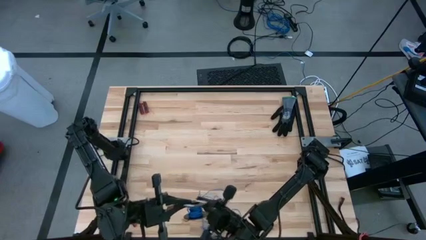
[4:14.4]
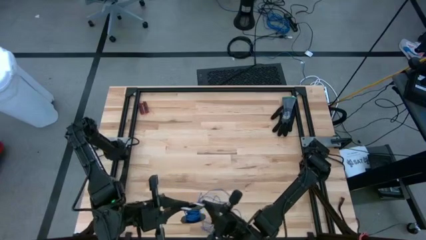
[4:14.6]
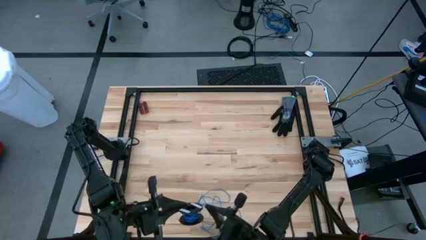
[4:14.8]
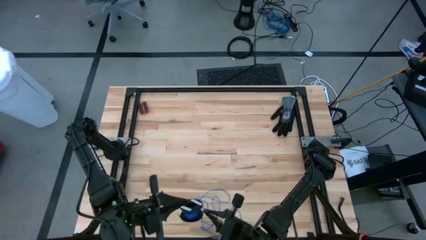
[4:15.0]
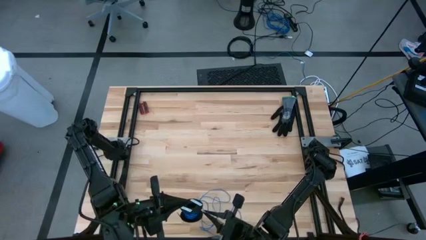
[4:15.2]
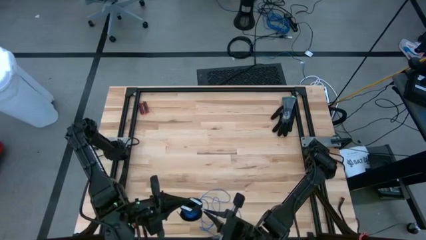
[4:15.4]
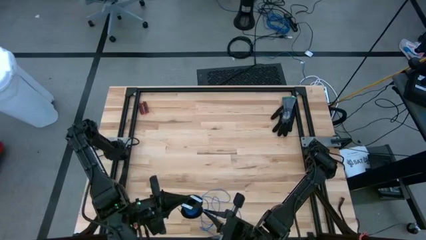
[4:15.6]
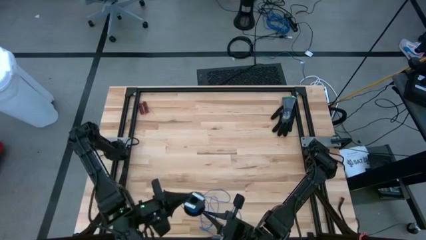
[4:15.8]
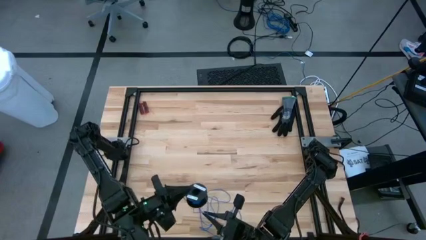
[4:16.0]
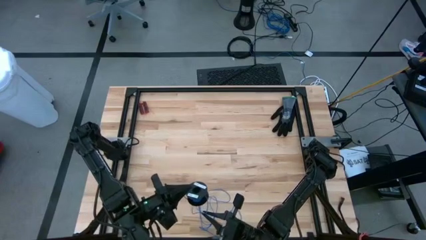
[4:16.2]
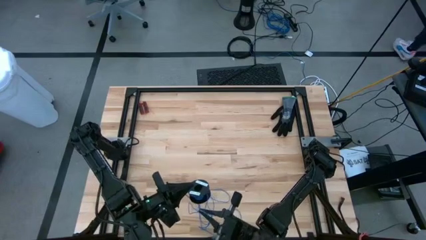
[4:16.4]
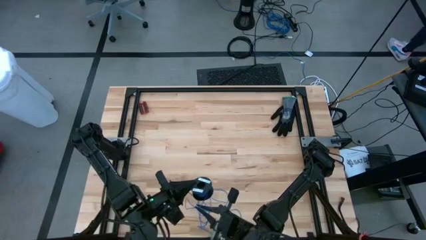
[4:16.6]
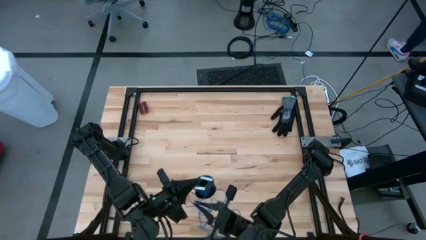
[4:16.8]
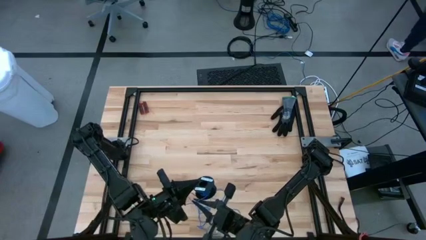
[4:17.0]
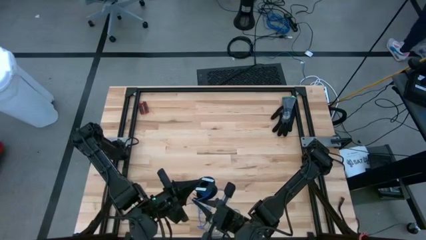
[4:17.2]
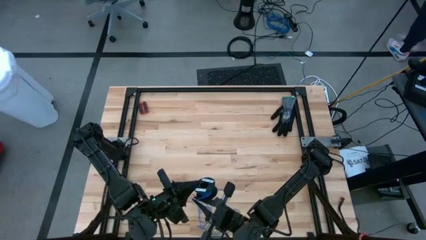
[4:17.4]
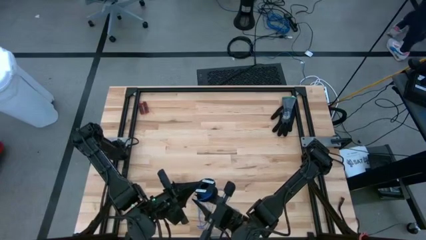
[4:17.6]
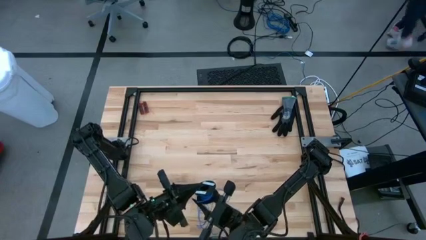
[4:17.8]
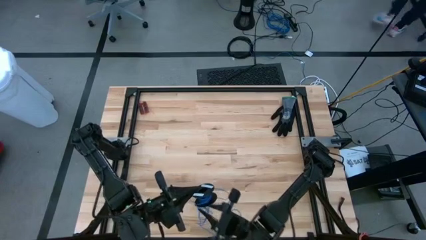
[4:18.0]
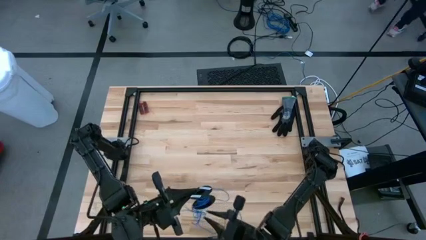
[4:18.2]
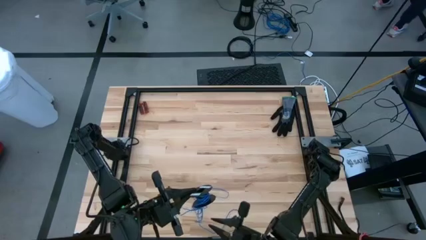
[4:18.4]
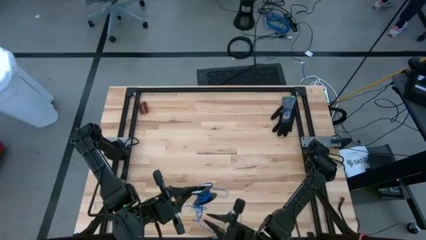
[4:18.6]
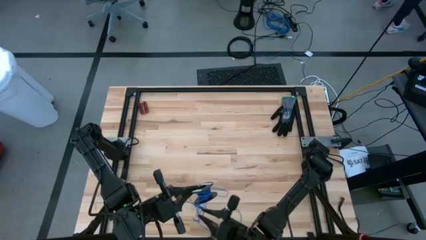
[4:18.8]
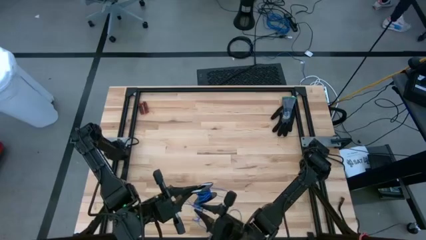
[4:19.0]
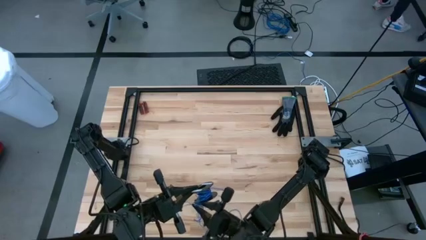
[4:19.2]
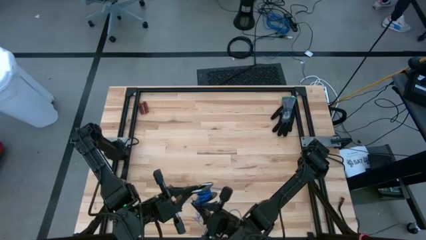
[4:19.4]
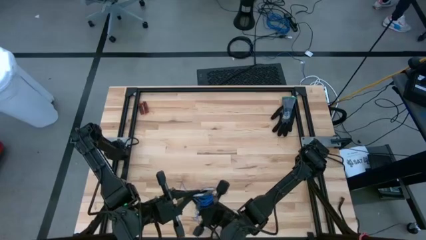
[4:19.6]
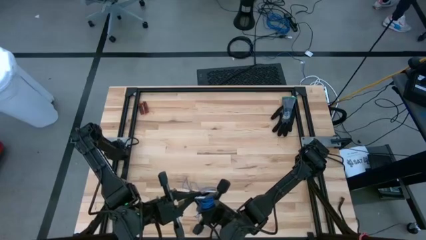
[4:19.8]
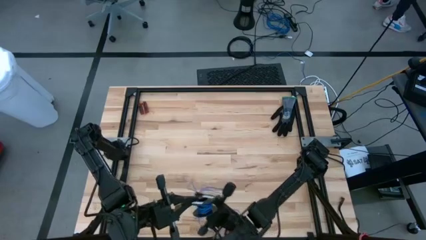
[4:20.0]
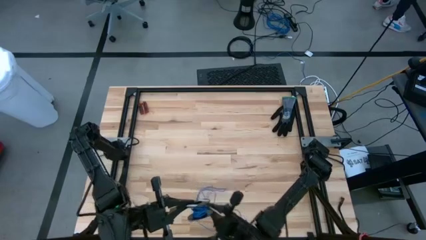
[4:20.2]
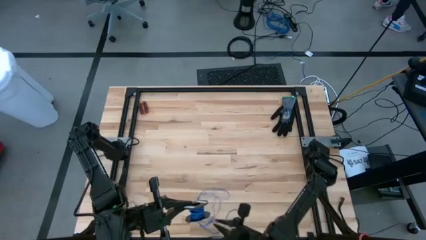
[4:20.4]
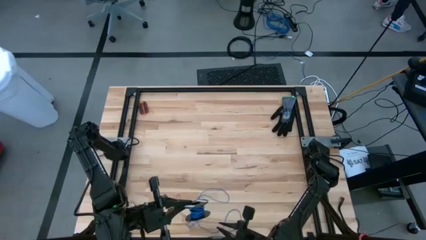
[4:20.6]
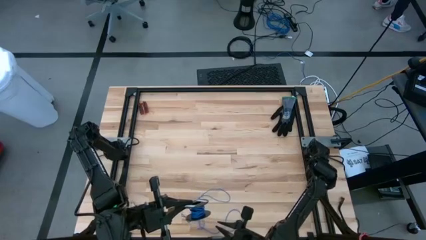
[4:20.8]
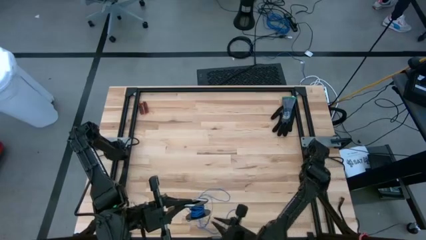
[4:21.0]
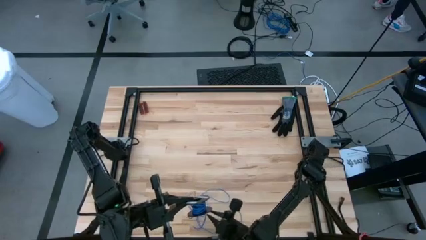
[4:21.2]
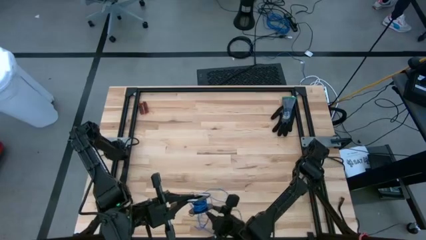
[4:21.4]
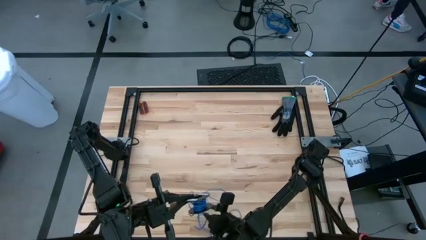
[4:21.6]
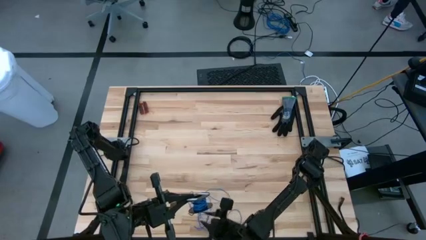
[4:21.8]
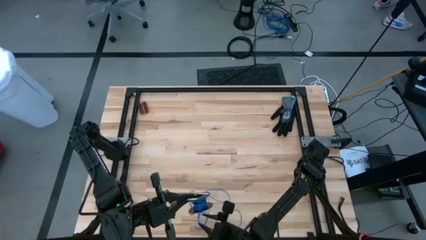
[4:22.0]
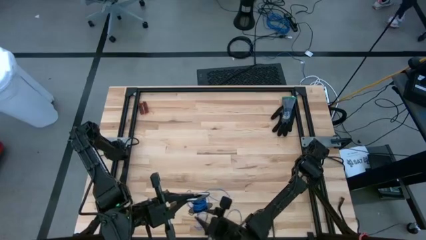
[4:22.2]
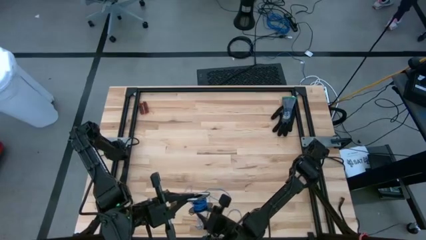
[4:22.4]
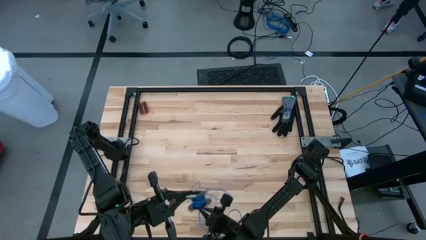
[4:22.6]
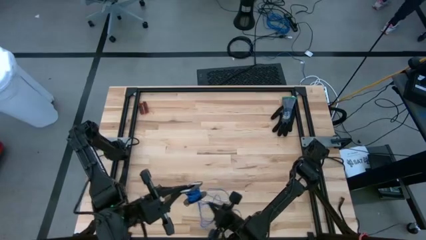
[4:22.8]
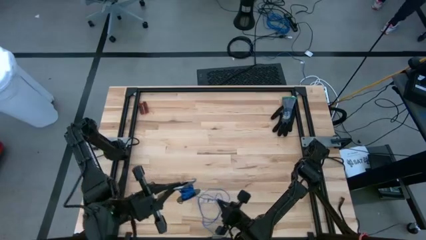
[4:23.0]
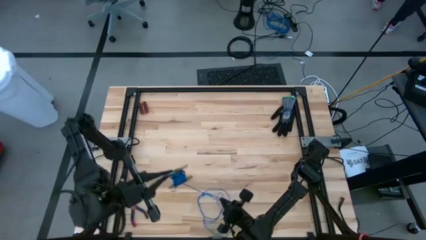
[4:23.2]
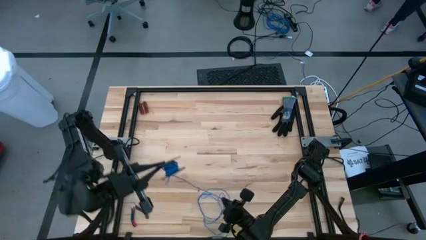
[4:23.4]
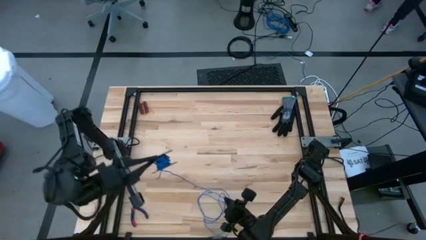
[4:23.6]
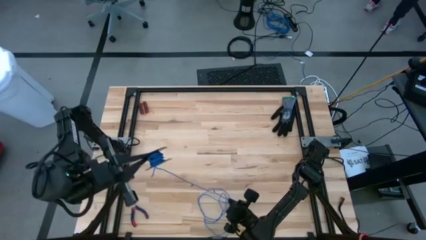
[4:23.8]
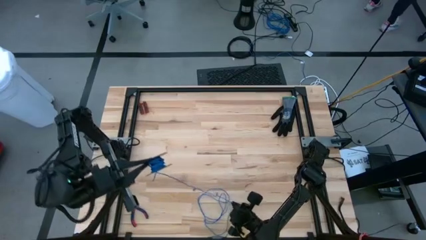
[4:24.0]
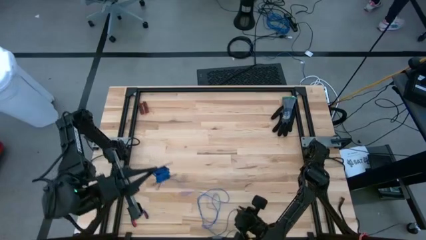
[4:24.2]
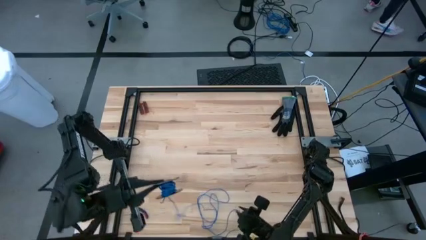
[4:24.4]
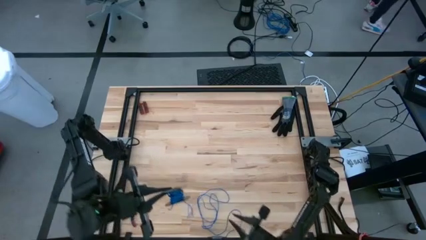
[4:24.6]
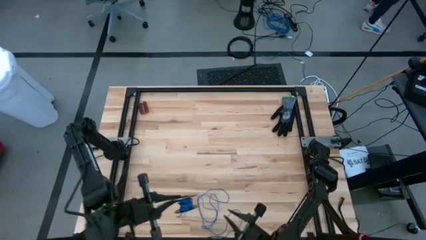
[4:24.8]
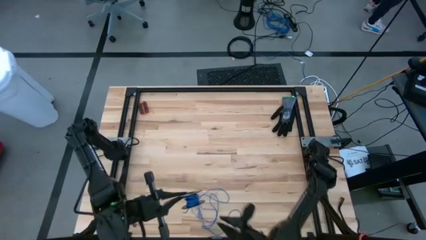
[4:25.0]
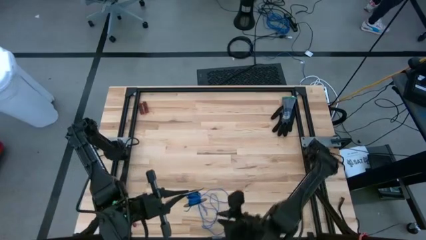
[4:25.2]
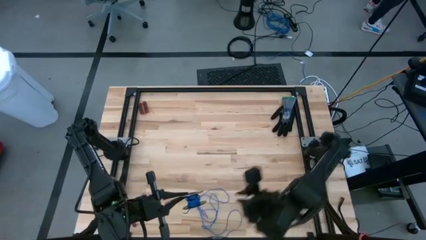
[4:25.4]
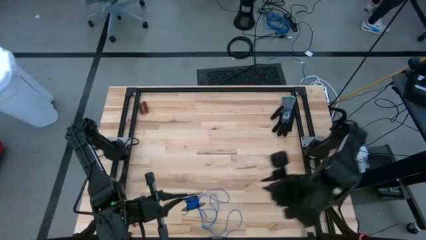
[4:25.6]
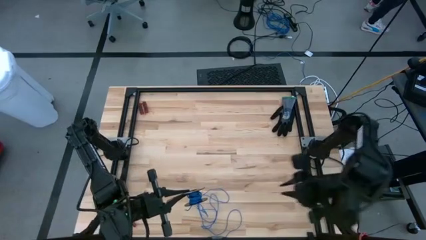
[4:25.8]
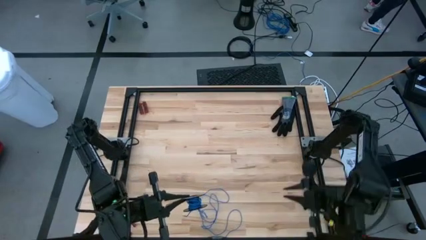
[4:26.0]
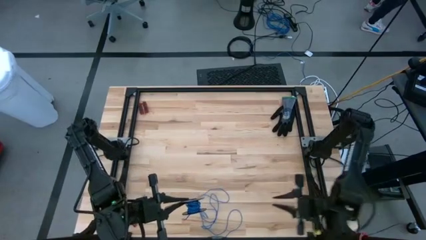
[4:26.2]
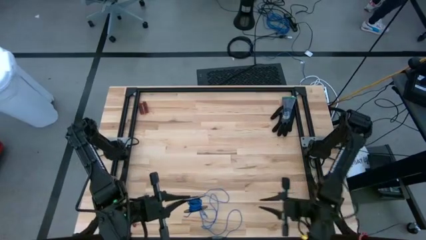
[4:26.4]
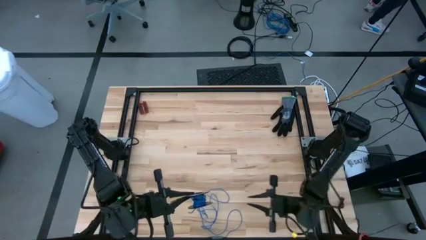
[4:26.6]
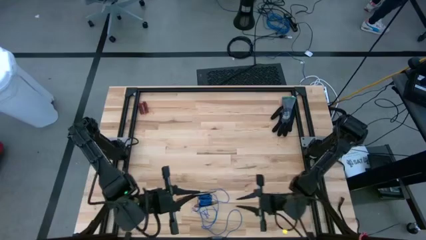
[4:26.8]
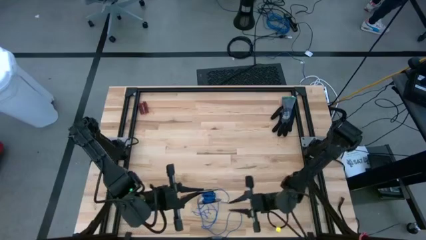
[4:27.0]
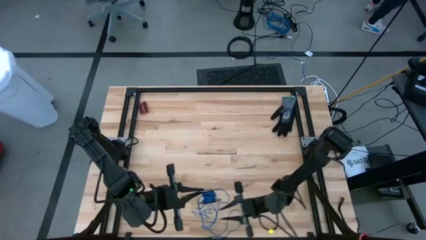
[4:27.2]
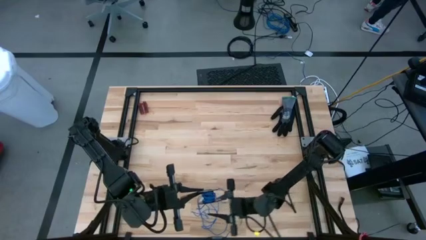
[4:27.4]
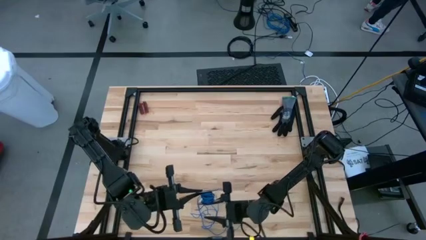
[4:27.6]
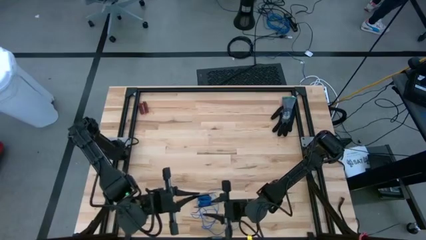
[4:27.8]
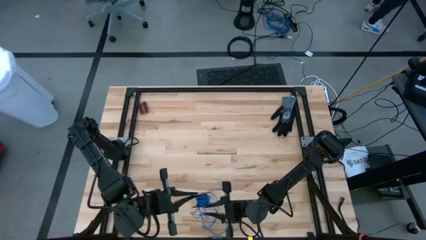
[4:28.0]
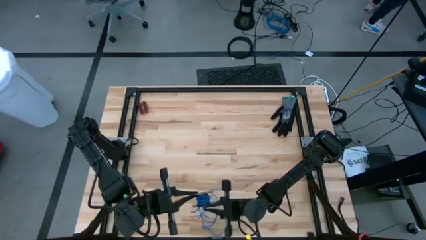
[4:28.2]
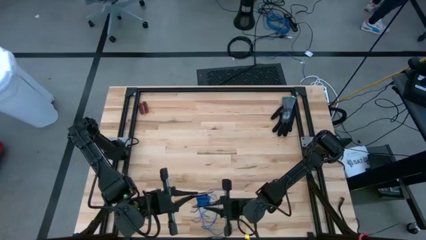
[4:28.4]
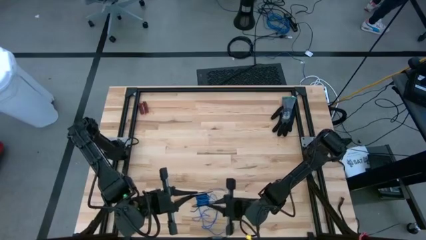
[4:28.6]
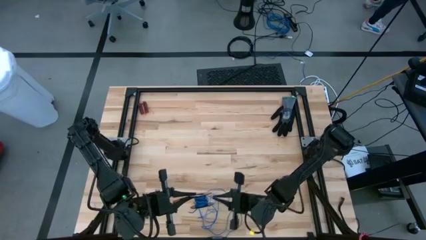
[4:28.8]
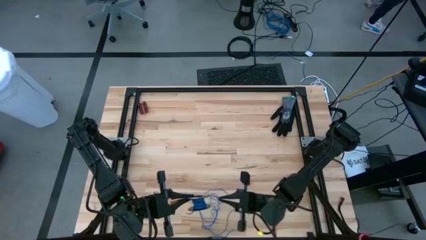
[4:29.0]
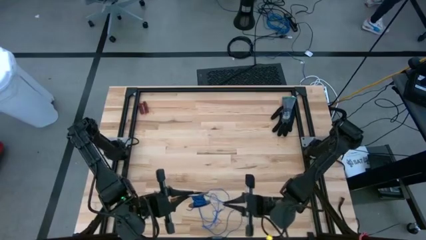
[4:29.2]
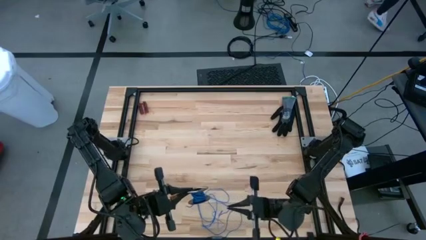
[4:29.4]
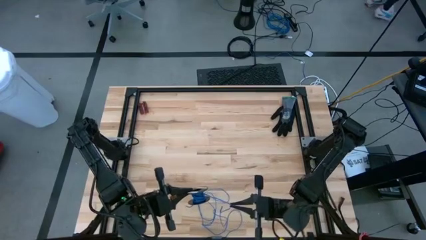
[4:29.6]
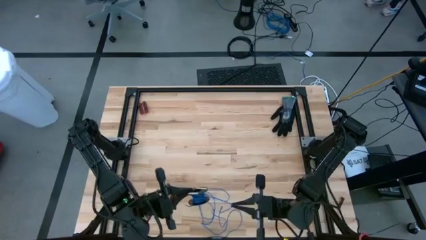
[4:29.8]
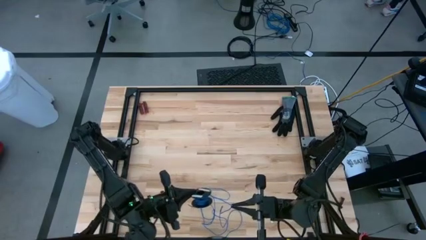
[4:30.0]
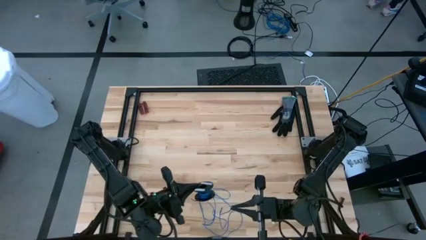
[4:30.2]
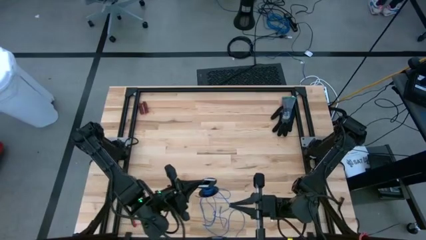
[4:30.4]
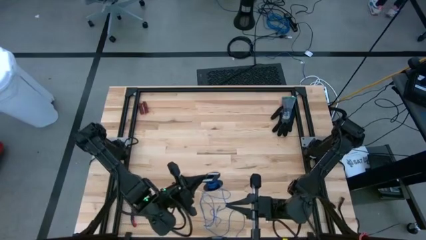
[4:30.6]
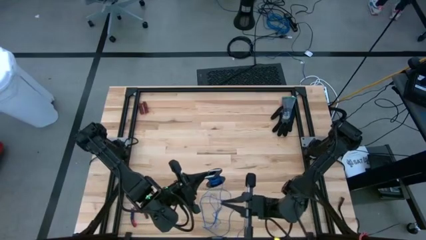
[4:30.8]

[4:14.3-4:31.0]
Task: Coil cords
Coil the blue wire onto a spool
